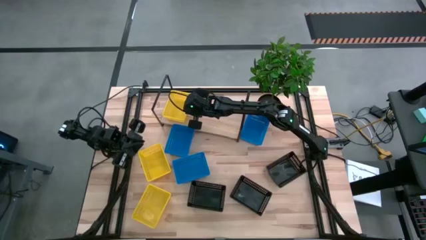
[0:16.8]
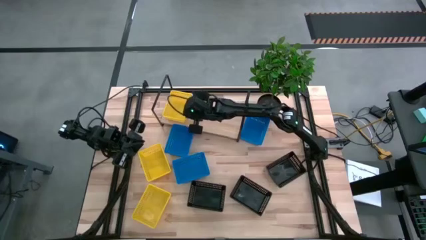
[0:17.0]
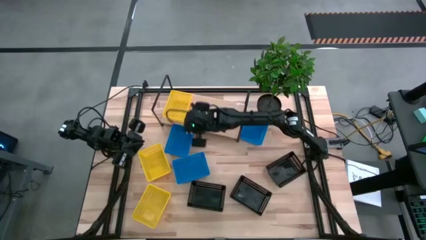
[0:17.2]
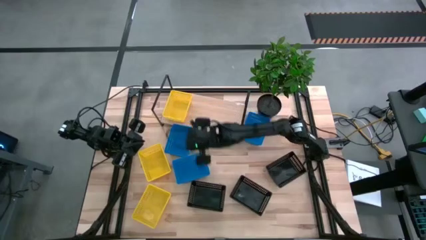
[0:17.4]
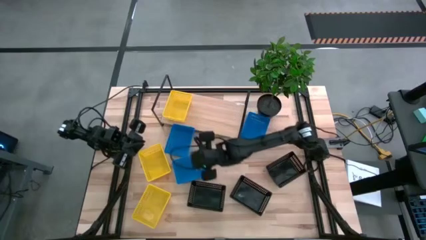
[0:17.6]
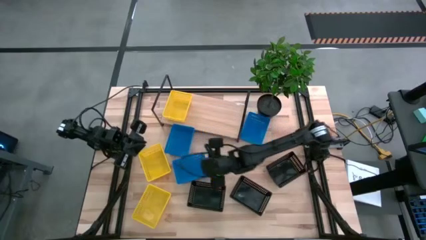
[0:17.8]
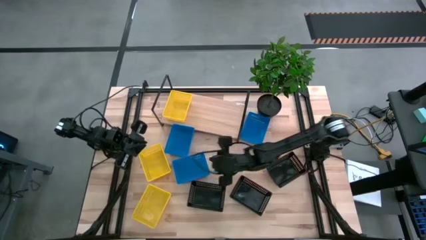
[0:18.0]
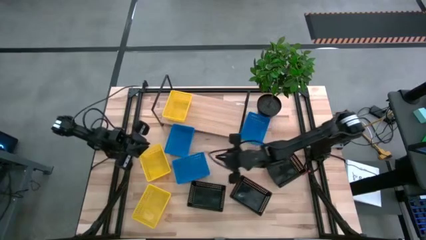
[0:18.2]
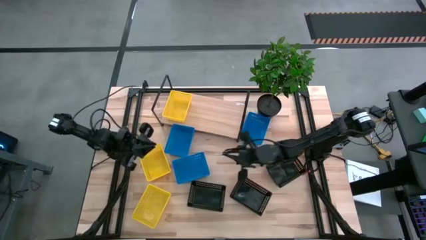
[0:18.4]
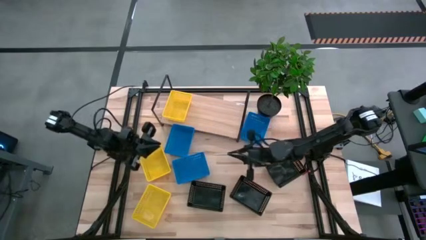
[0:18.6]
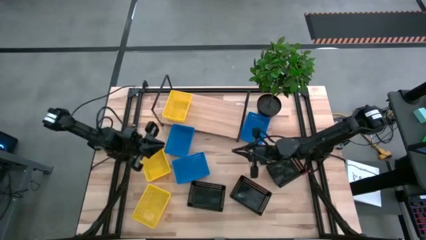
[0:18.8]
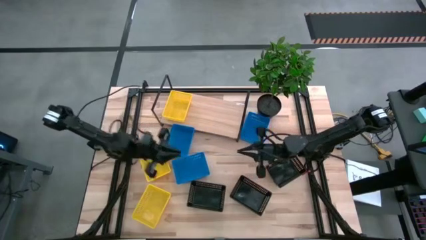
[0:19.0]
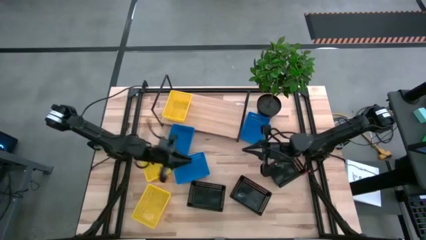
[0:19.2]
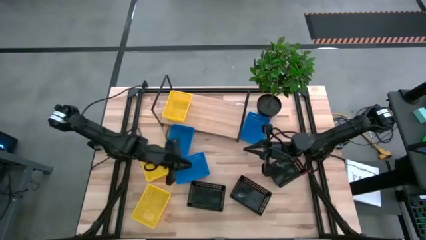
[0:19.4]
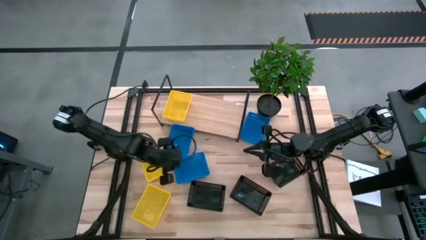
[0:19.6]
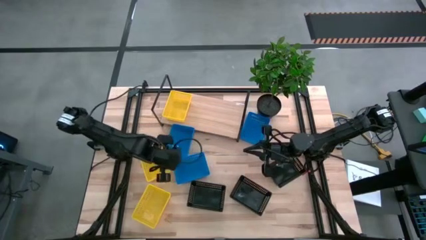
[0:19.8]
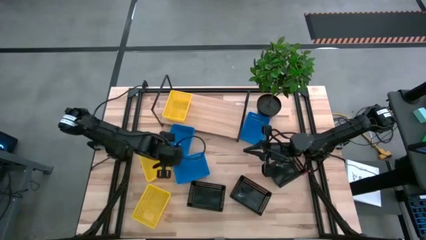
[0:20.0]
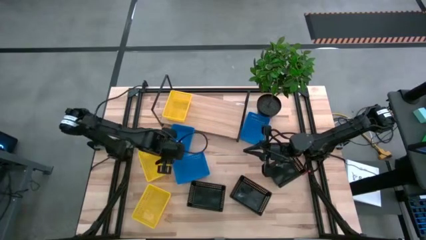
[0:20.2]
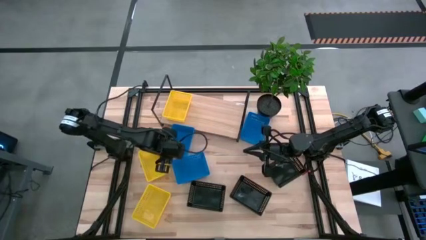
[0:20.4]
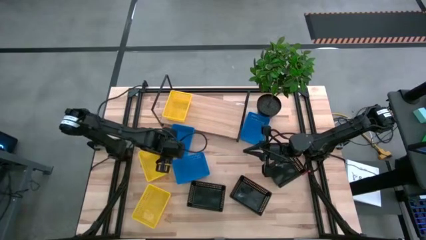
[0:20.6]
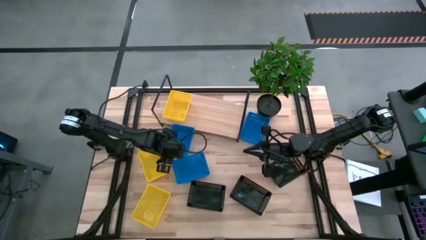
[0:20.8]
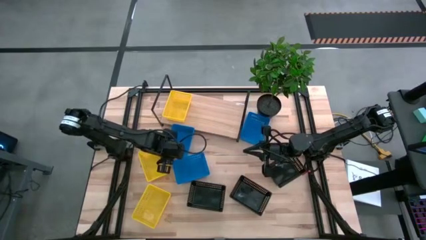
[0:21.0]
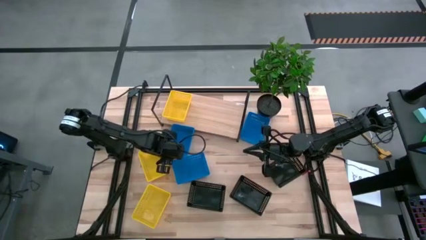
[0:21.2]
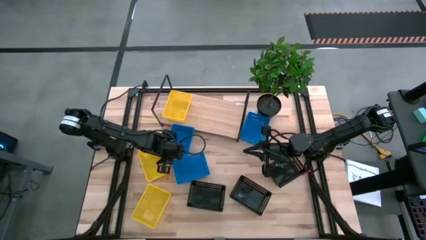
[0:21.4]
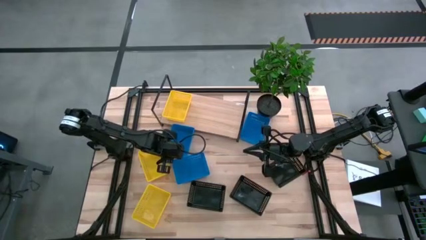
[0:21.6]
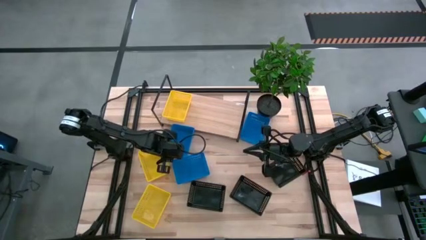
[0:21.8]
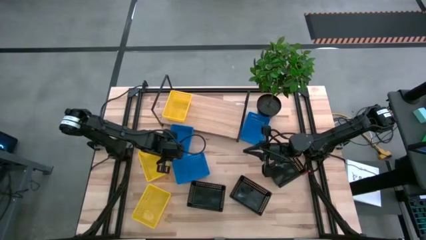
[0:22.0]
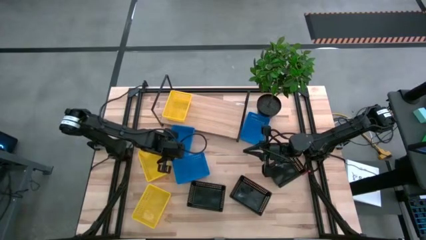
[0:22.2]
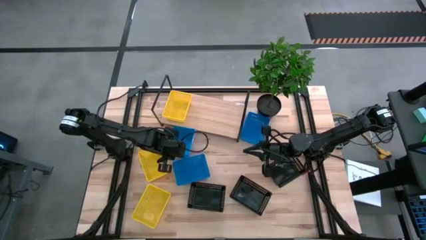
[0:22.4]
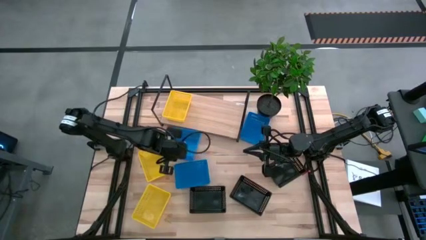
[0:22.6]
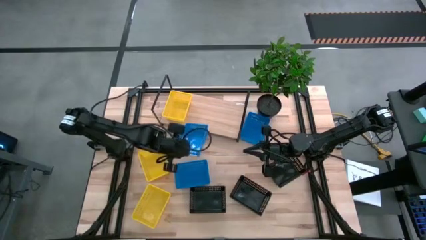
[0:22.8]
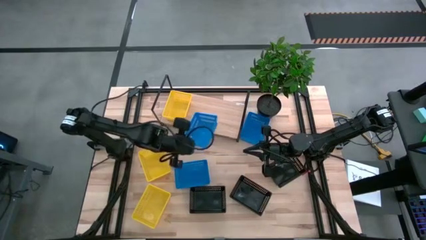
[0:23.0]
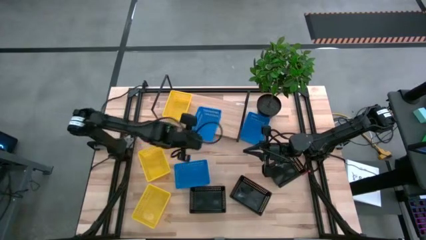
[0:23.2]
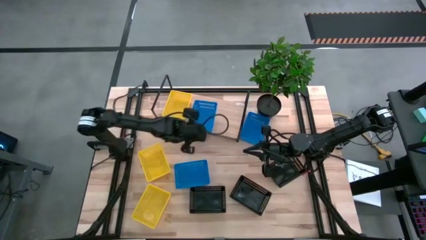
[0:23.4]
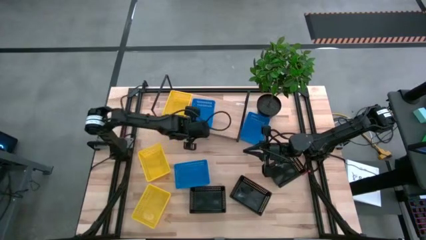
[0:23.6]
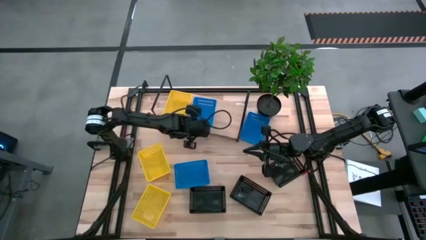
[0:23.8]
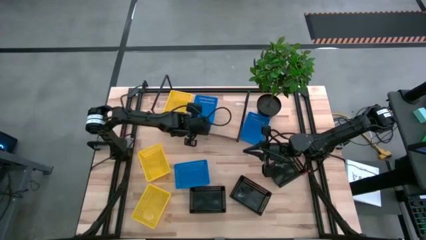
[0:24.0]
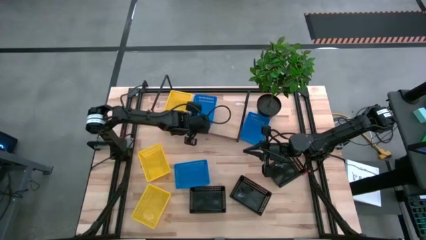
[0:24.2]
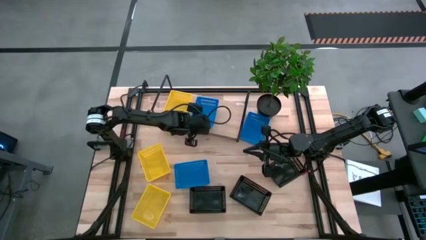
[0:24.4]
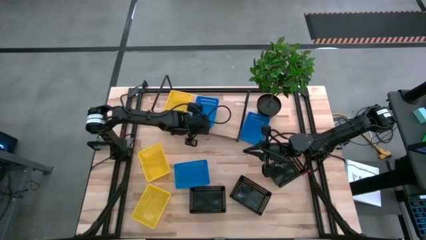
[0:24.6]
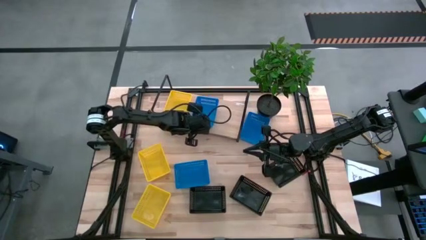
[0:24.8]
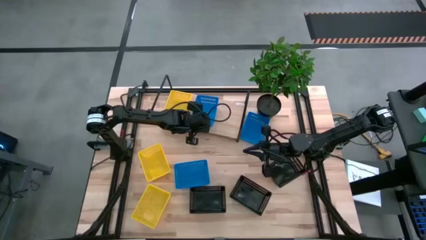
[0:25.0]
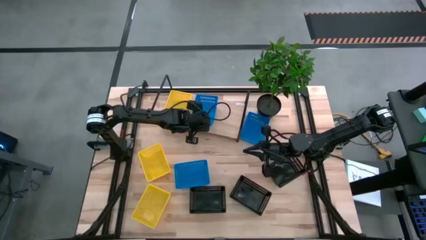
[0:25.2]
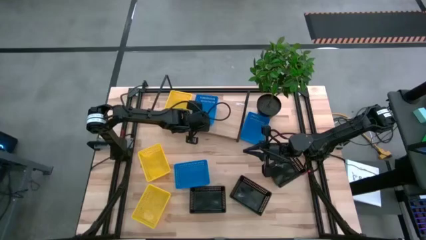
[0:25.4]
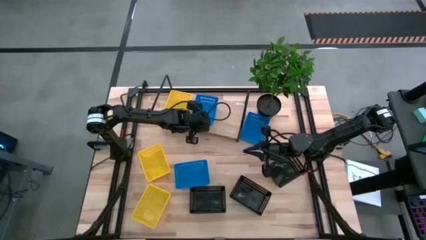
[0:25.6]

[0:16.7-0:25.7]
Task: Stack baskets on shelf by color
Put the top left blue basket on the shelf

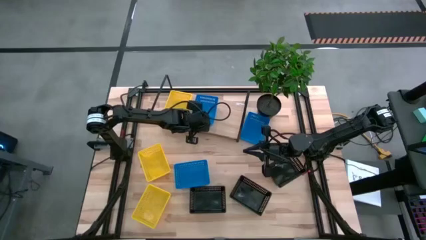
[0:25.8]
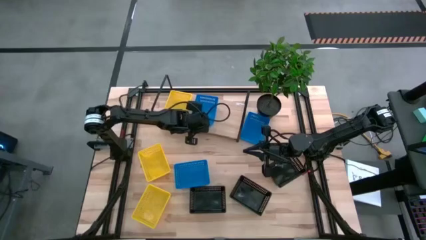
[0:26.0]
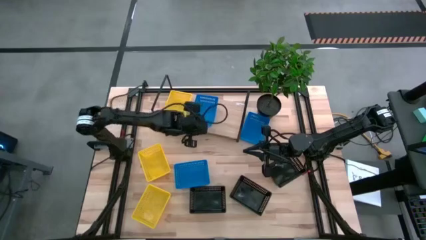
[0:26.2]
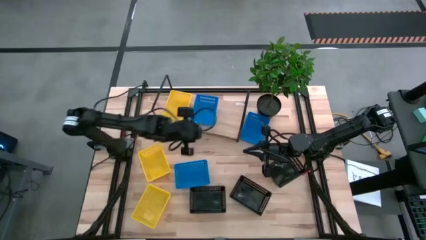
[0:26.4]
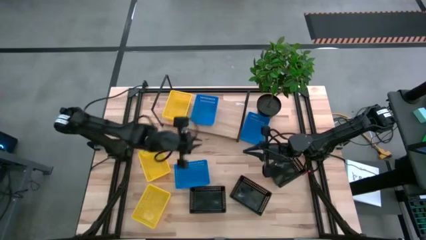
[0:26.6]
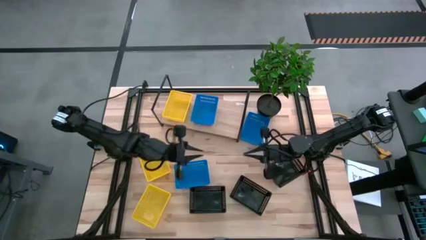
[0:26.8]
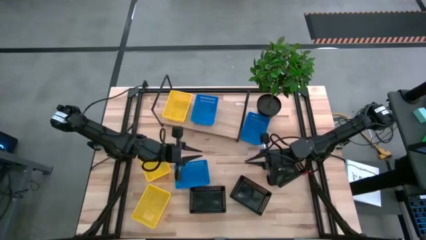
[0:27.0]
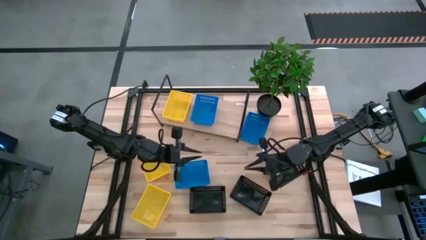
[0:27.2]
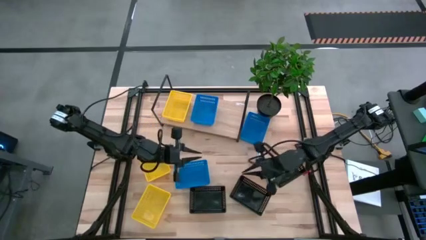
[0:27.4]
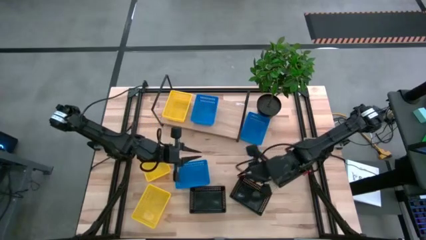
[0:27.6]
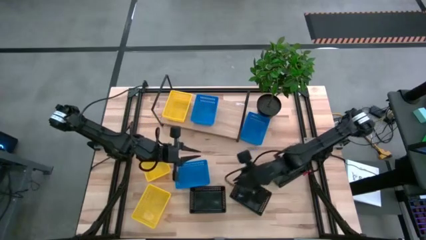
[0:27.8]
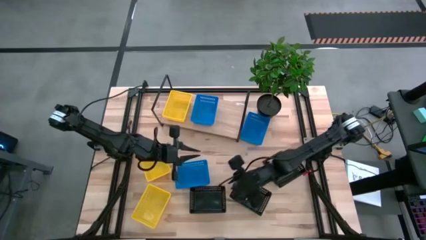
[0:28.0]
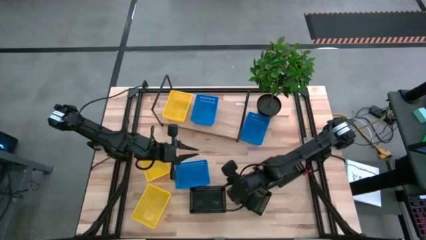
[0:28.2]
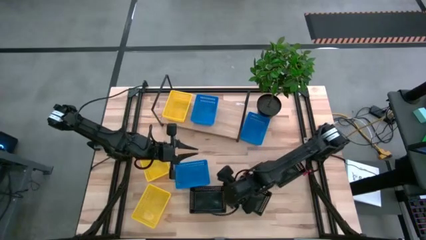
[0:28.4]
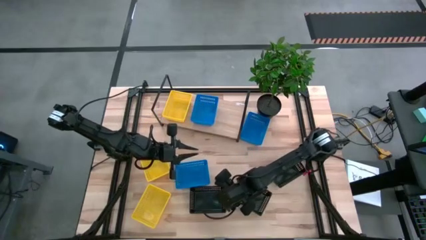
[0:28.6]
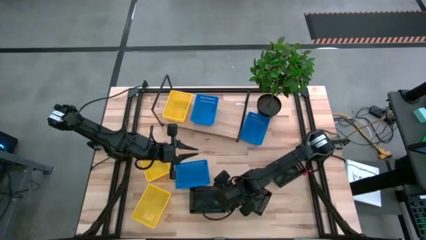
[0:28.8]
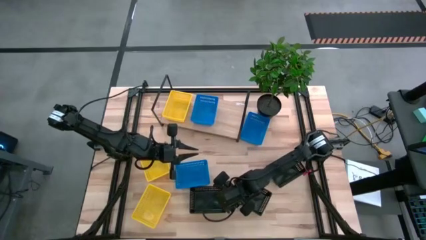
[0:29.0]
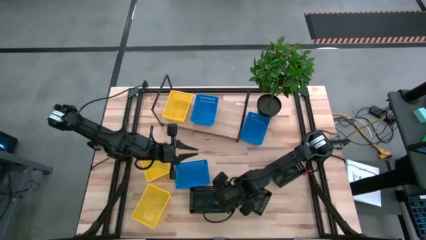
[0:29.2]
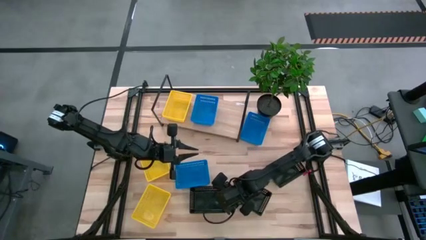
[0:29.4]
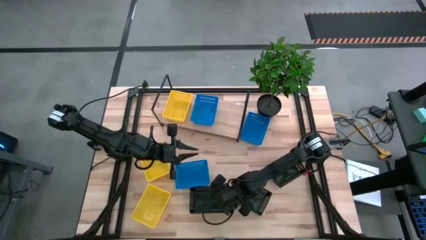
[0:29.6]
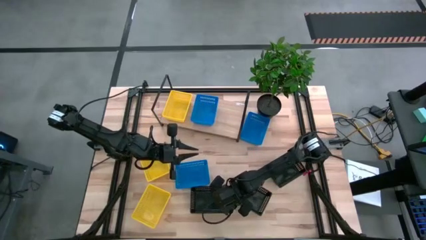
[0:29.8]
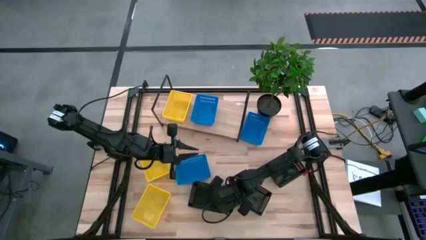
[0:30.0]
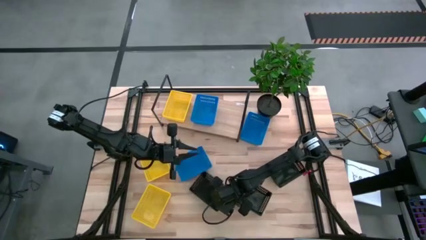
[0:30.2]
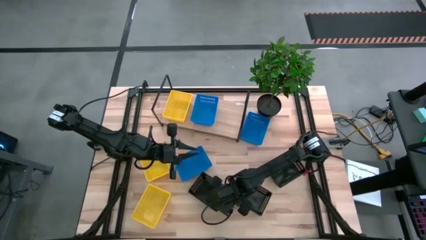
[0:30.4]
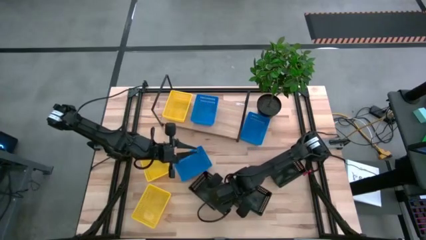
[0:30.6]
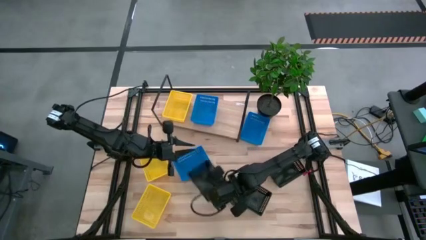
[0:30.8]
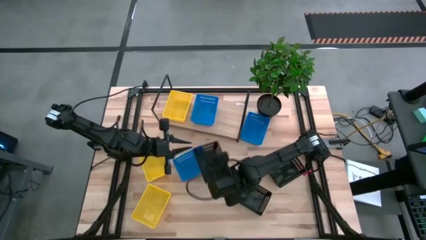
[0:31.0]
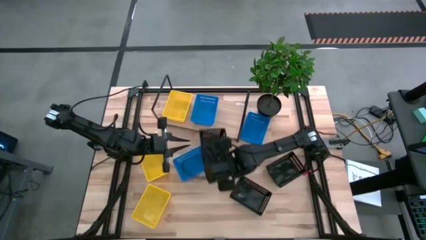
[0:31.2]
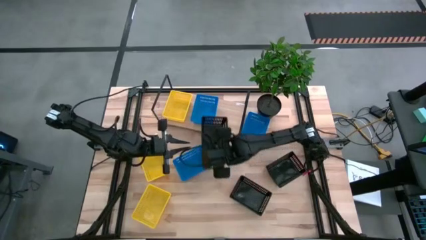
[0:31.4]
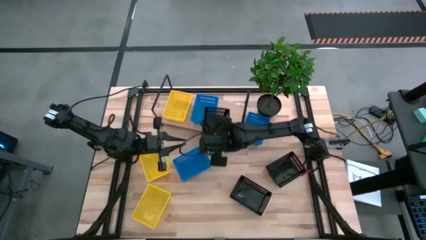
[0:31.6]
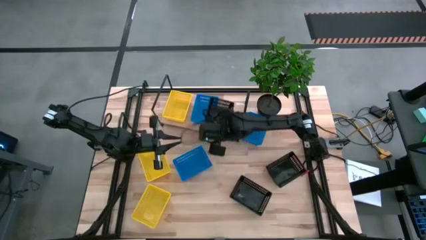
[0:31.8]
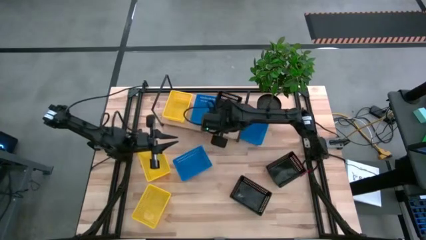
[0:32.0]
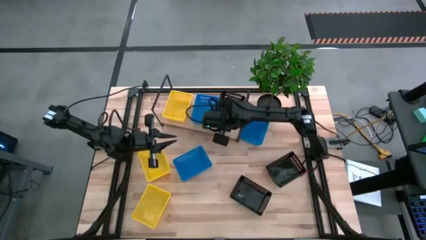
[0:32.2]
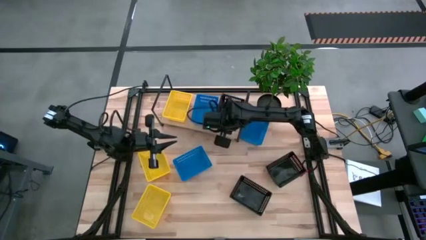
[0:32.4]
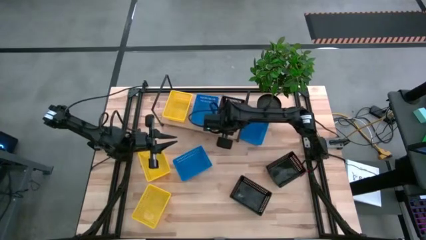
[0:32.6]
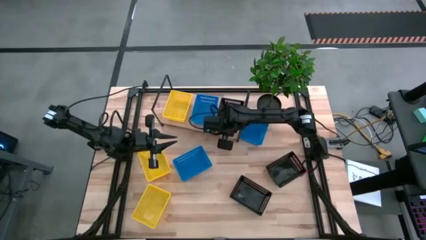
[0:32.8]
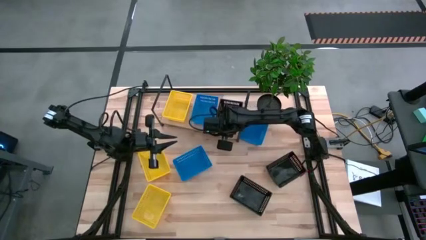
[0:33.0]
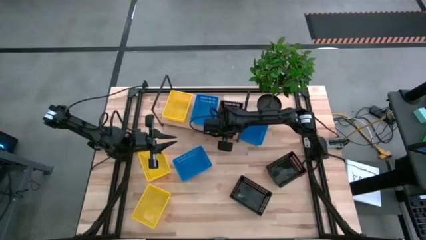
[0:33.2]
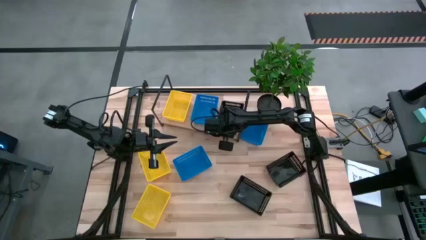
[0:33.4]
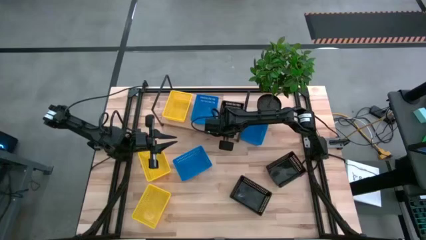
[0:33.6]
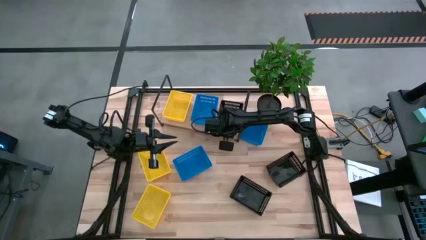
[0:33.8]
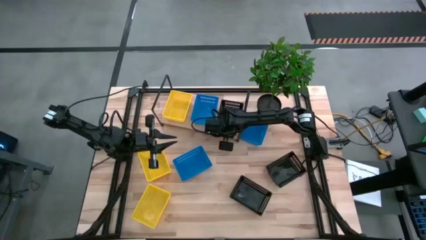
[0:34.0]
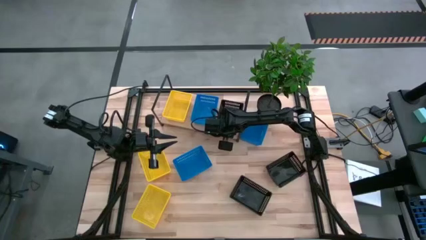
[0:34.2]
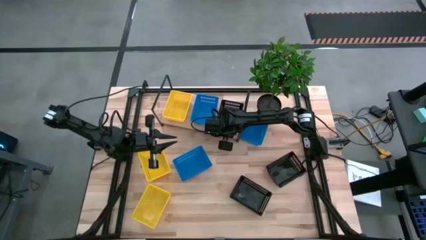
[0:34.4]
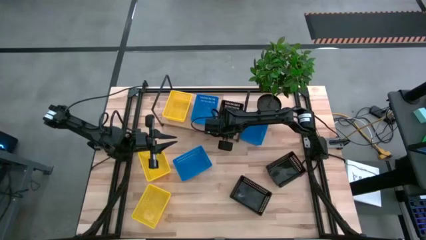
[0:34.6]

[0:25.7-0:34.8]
Put the left black basket on the shelf
